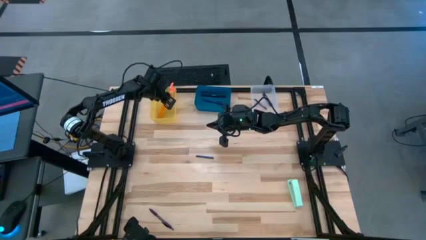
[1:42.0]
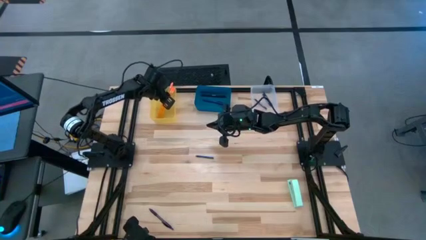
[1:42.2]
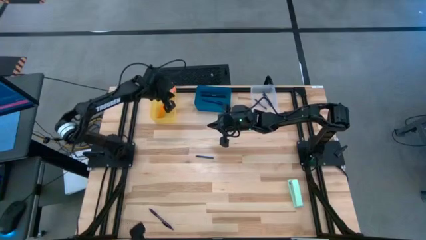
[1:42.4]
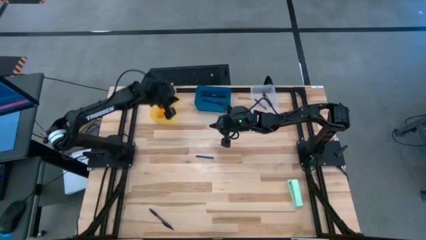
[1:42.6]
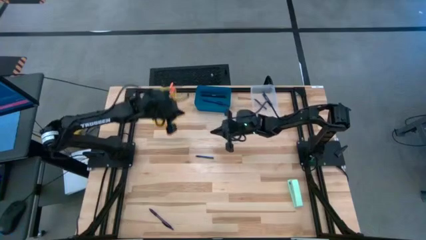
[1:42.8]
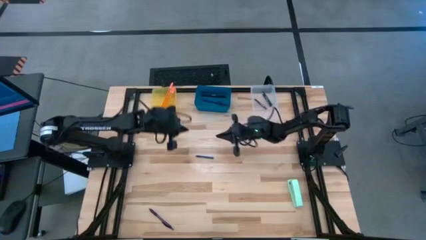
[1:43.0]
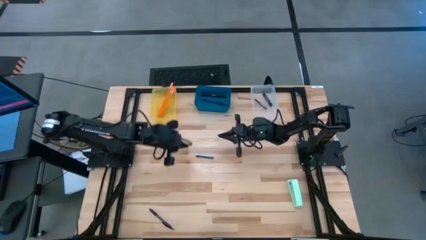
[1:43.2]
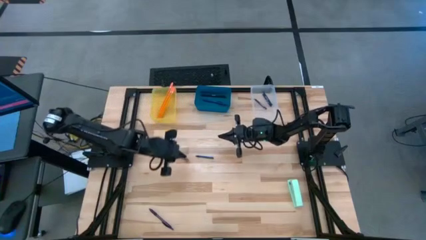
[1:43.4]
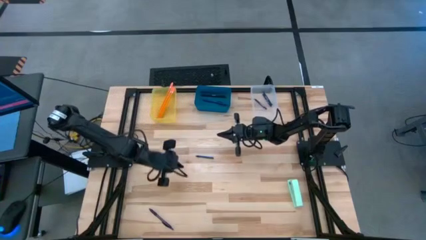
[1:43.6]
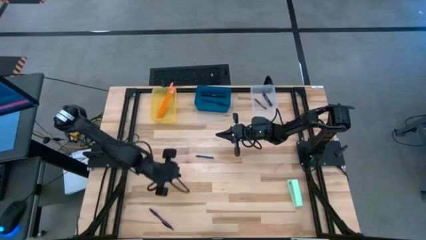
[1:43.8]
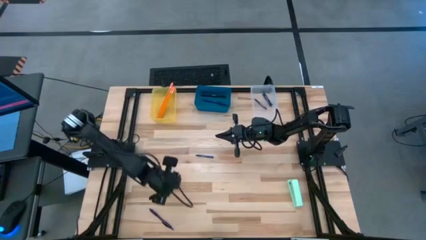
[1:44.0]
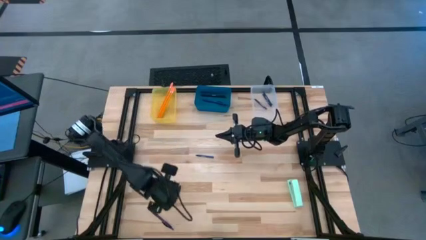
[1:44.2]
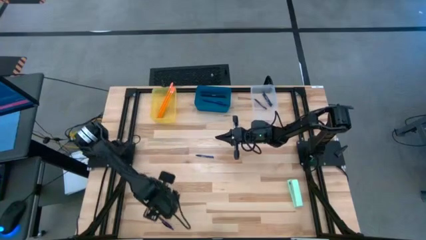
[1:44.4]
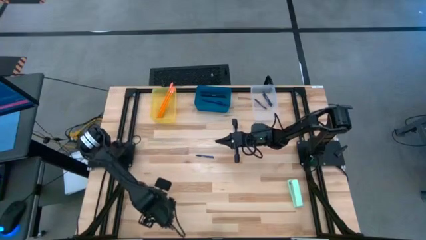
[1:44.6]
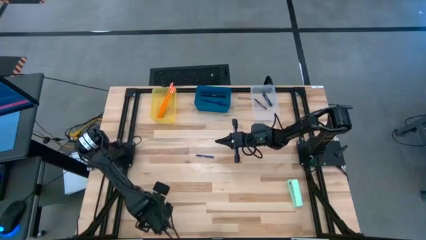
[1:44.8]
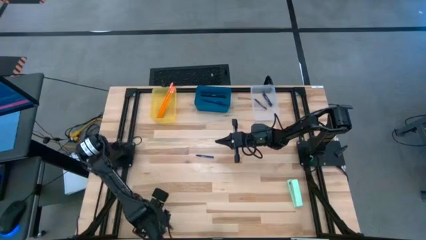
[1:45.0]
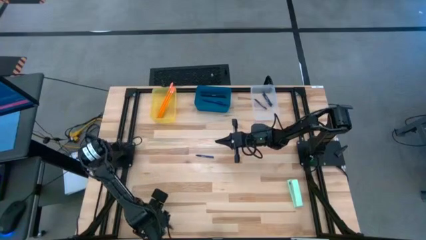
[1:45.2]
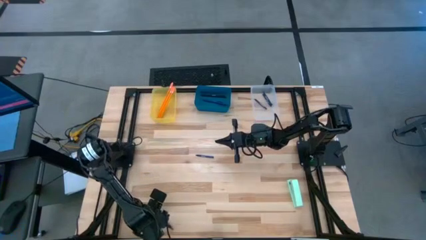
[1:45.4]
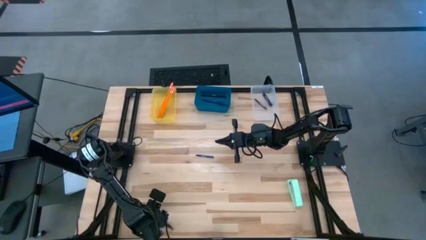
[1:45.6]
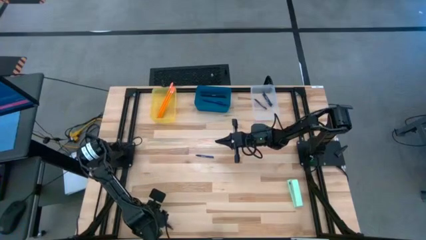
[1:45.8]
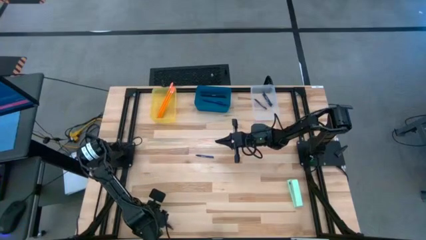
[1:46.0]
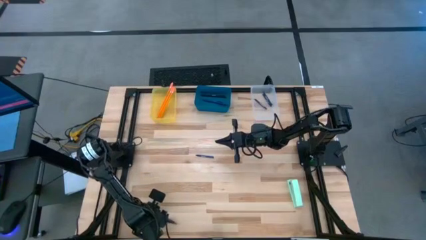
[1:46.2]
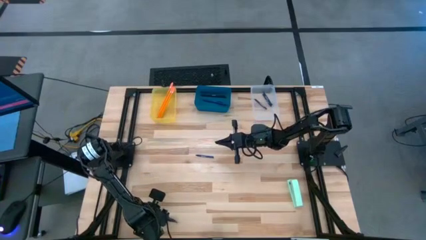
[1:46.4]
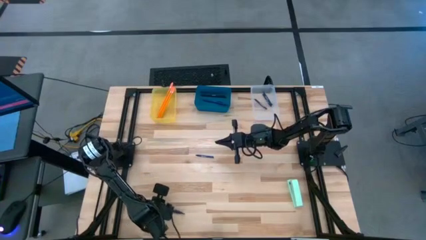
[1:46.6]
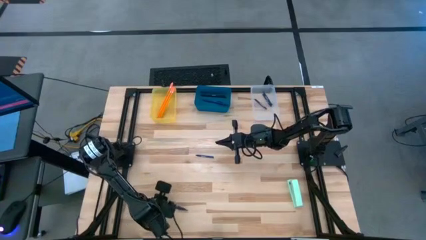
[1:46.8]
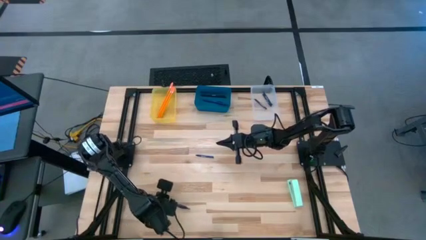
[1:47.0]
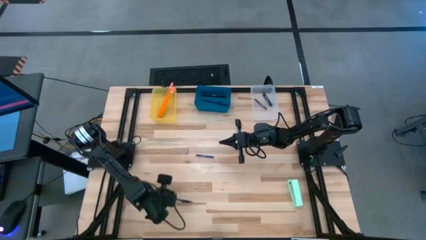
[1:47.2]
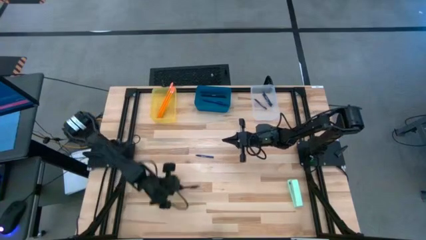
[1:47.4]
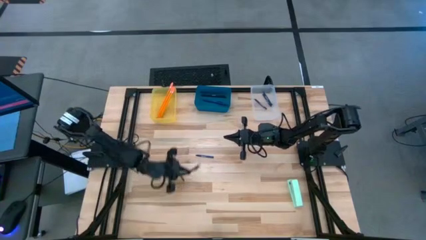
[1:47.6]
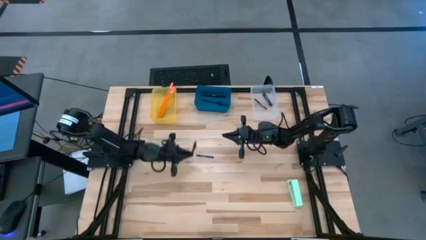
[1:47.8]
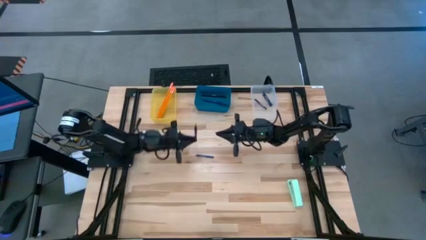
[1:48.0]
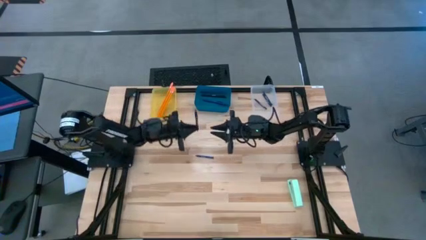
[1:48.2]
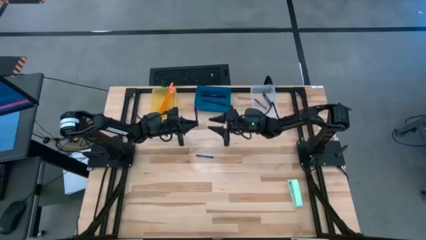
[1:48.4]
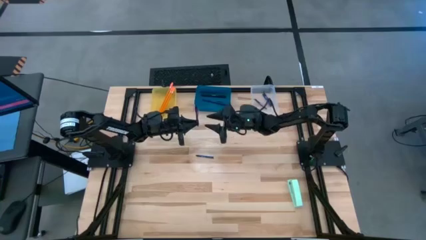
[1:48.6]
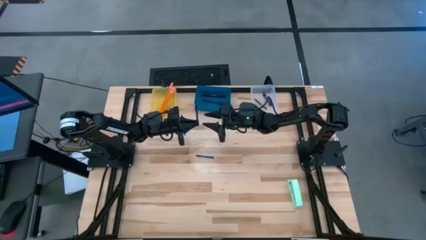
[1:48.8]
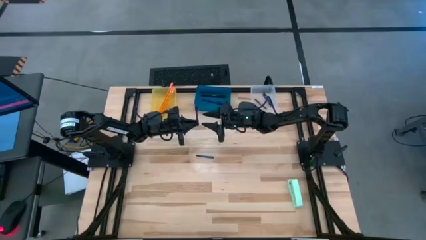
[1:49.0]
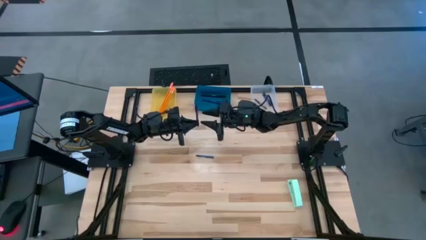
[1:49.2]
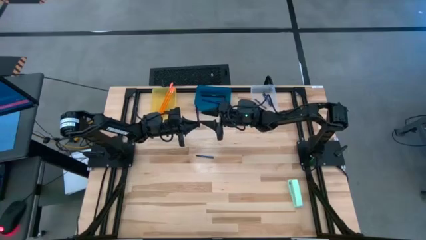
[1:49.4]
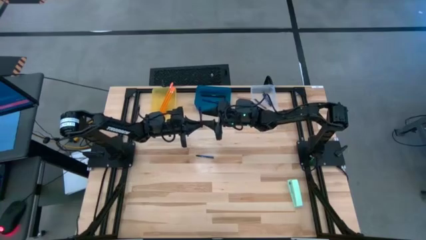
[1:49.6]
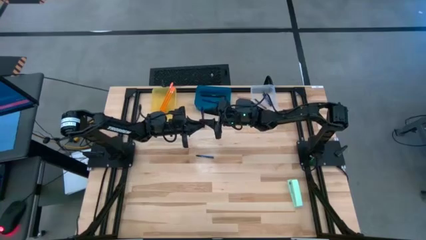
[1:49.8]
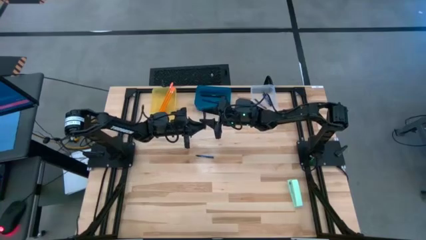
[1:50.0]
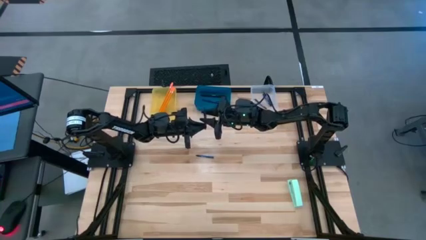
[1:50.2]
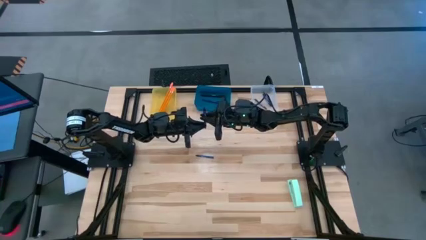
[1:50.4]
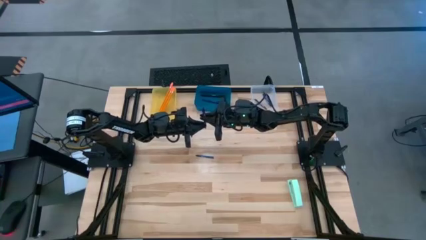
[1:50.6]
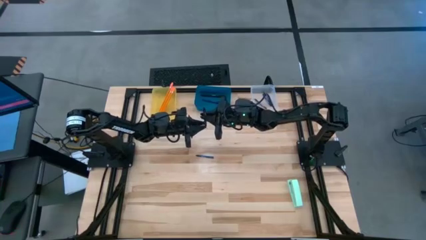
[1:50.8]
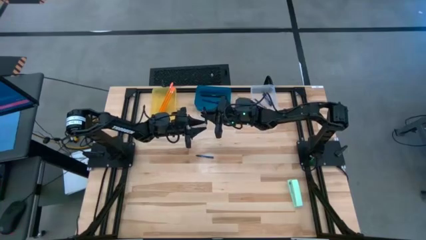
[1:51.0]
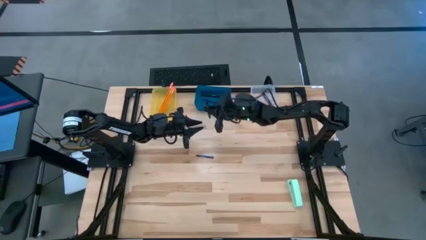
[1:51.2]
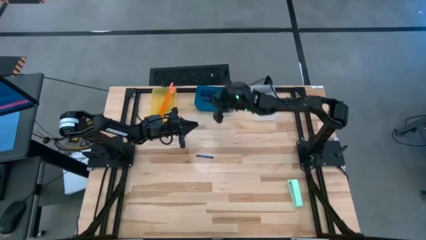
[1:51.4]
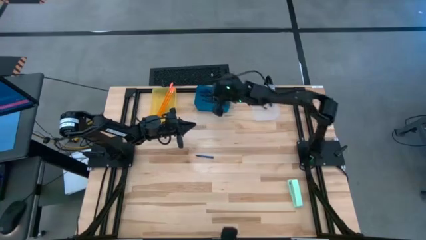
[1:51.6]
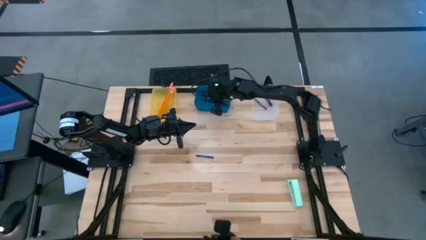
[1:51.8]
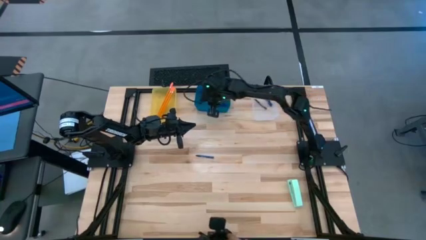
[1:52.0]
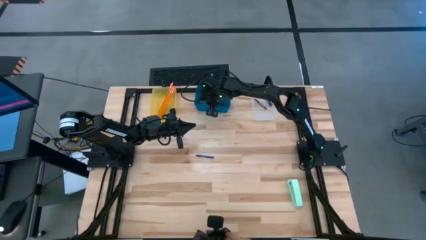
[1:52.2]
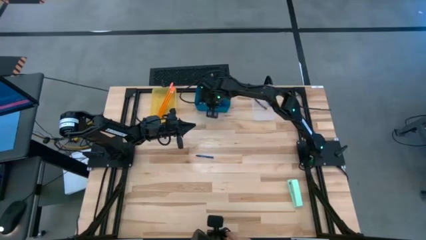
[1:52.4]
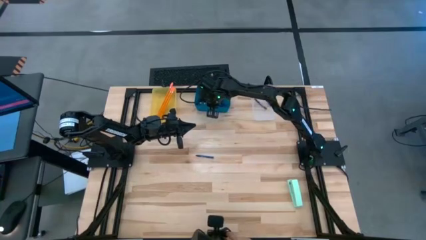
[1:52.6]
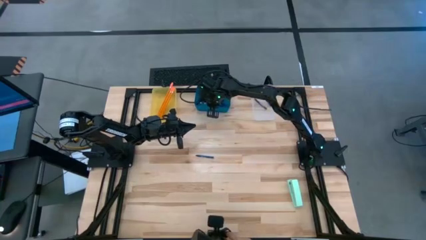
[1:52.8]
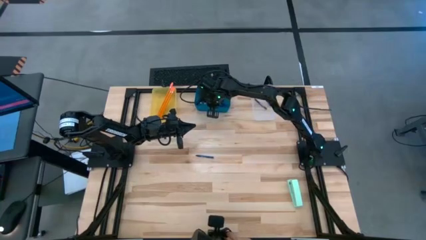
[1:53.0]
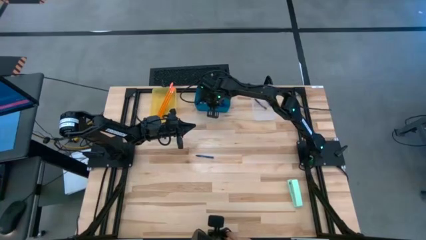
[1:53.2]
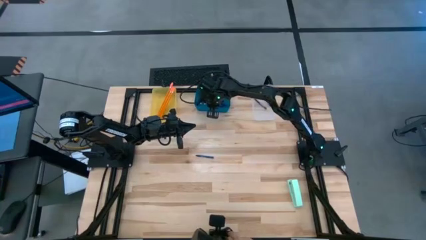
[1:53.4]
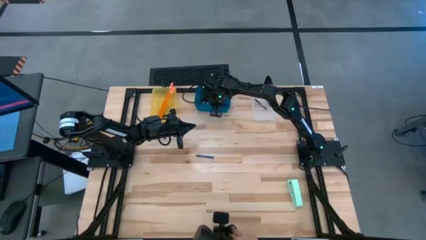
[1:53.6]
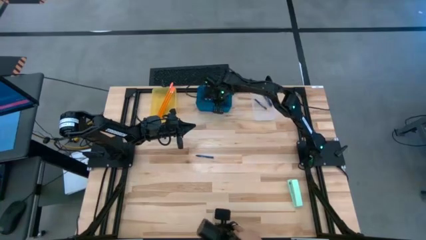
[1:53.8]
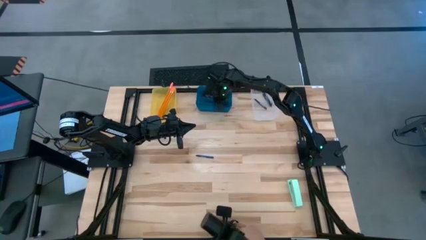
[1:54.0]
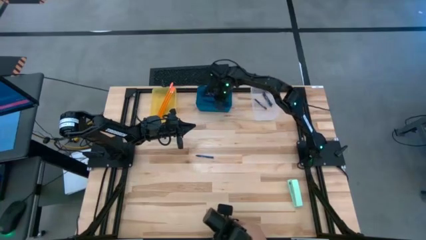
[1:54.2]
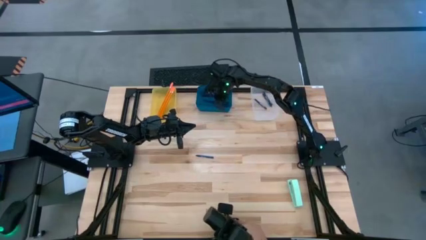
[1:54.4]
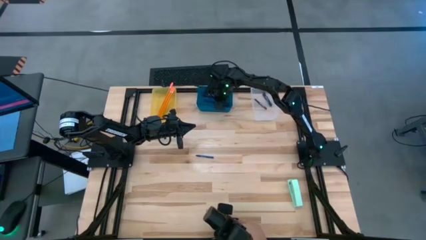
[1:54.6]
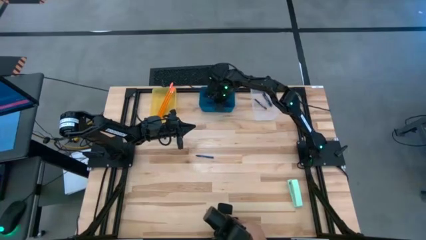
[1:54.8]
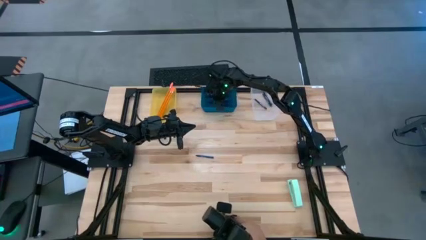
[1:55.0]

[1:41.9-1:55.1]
Task: Sort crayons/erasers/pens/pencils in bins
Put the purple pen into the transparent blue bin
